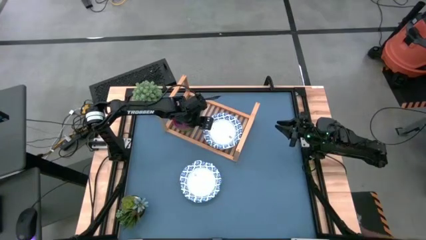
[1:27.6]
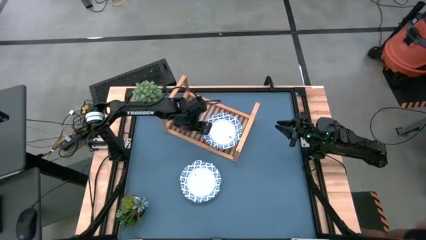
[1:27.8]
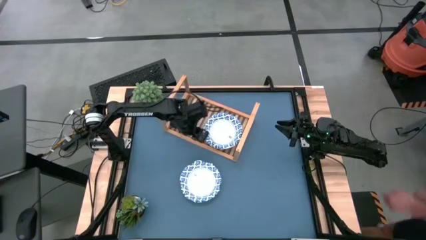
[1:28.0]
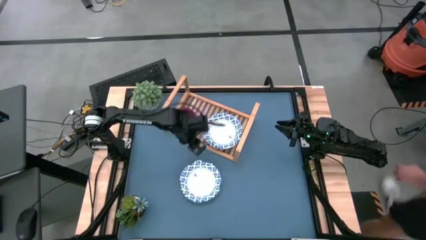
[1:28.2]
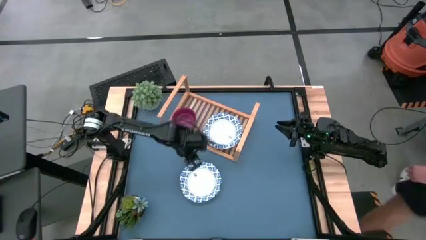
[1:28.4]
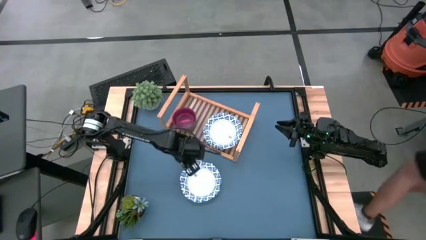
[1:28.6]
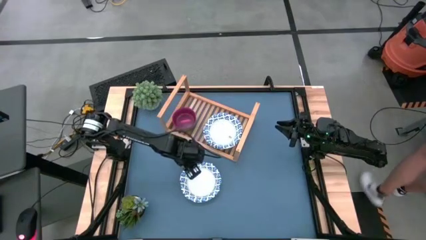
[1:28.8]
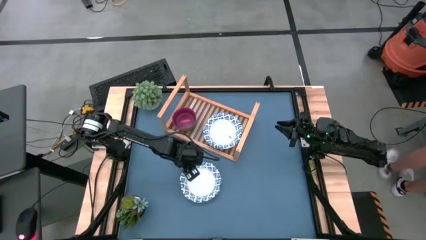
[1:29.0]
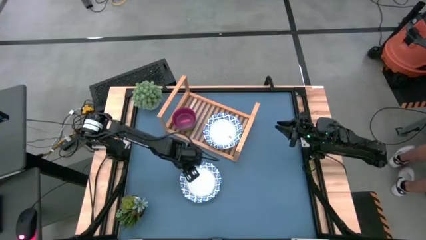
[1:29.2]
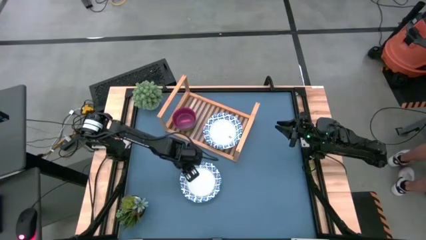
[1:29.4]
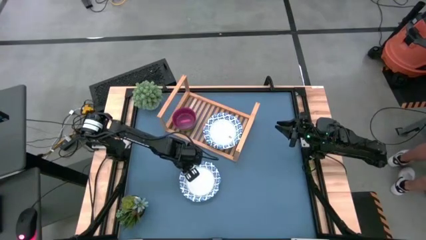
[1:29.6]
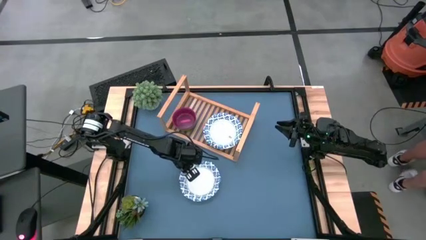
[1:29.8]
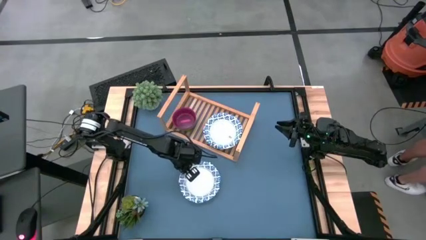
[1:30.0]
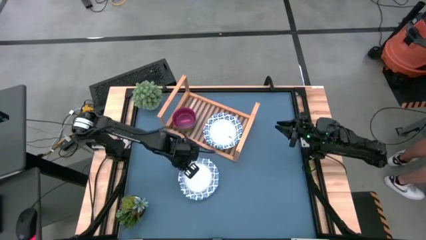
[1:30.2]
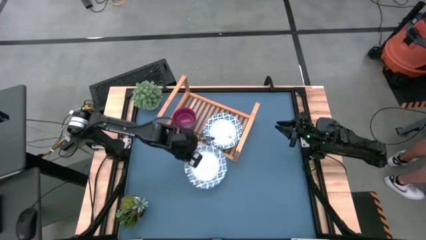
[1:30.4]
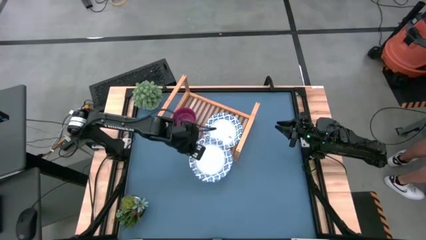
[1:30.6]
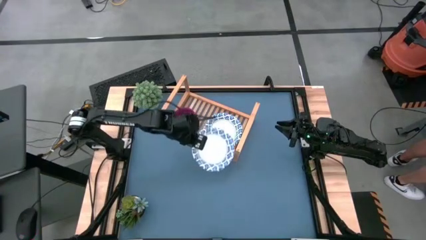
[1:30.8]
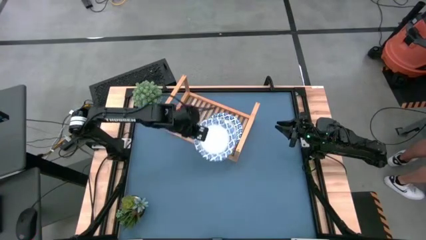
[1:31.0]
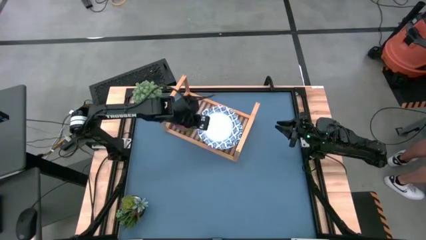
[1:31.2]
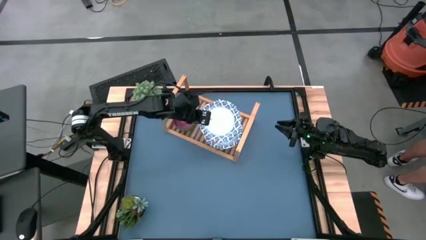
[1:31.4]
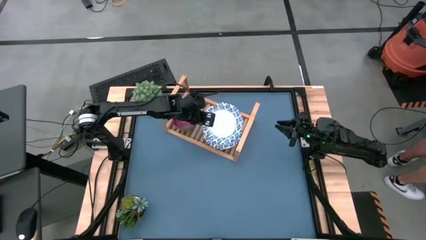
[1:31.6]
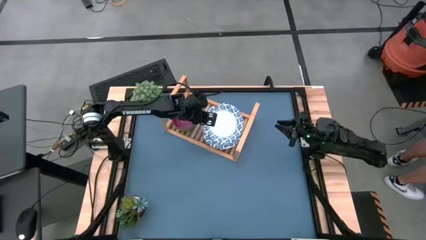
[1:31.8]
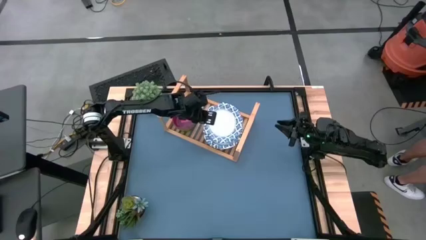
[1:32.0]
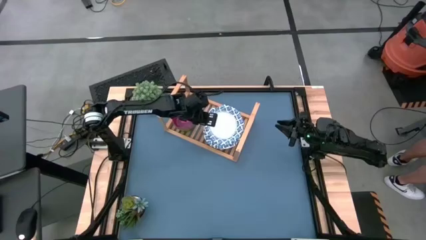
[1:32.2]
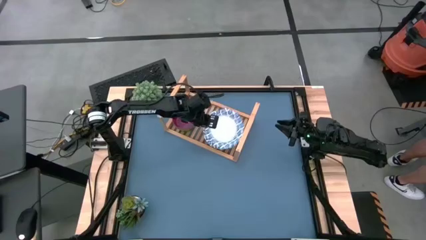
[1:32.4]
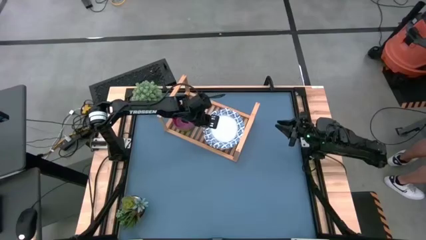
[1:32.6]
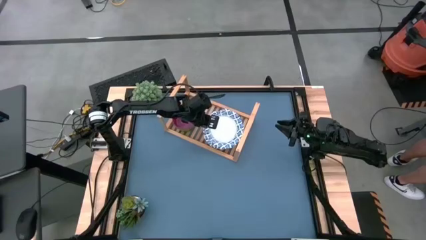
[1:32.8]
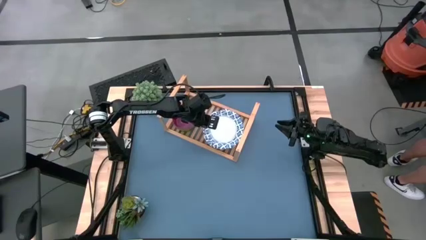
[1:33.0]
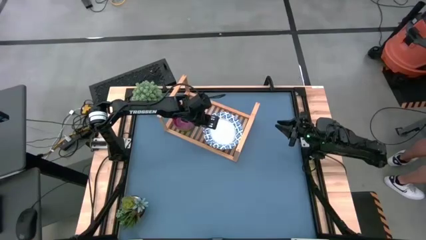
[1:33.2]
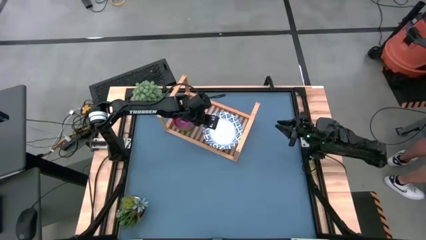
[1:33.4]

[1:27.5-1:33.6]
Task: Place and stack bowls onto a shelf
Stack the large white bowl on top of the large white bowl on the shelf

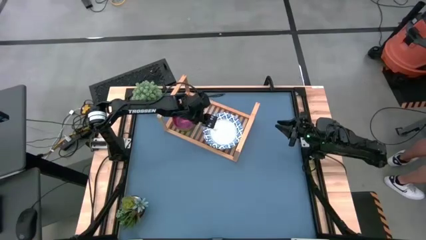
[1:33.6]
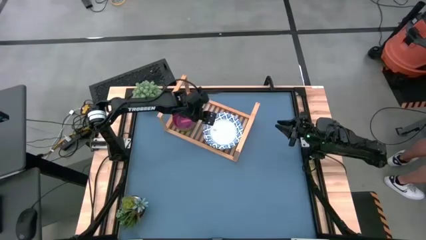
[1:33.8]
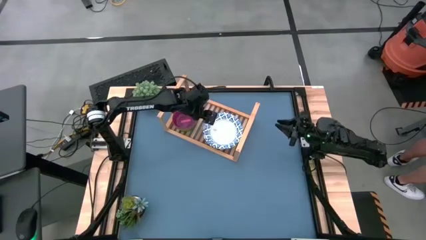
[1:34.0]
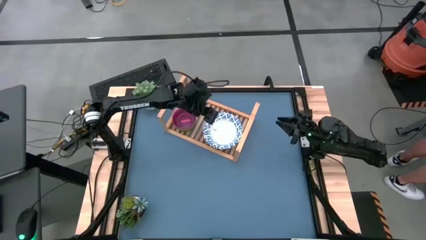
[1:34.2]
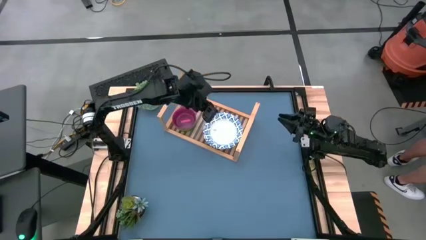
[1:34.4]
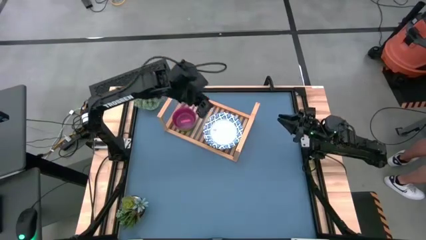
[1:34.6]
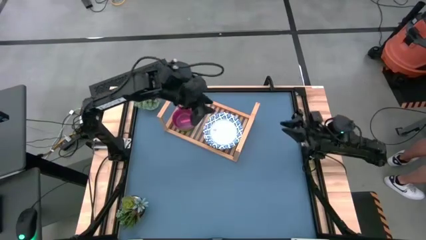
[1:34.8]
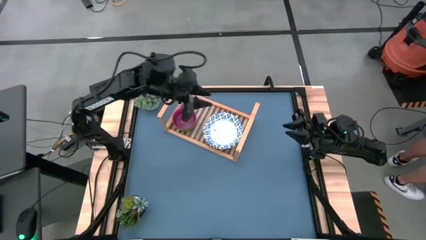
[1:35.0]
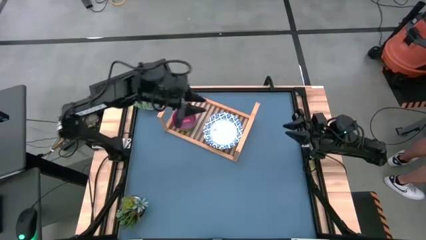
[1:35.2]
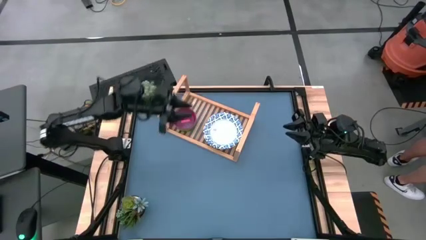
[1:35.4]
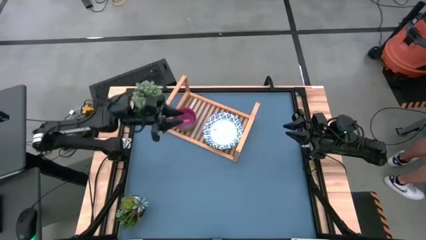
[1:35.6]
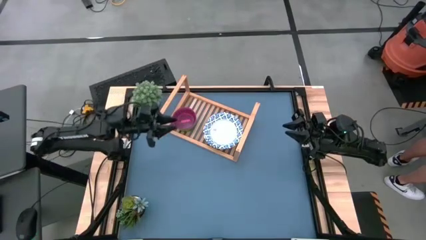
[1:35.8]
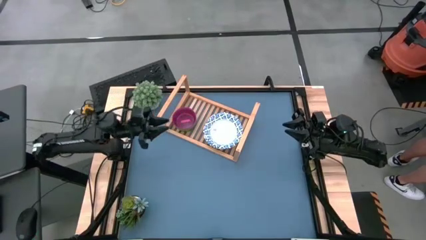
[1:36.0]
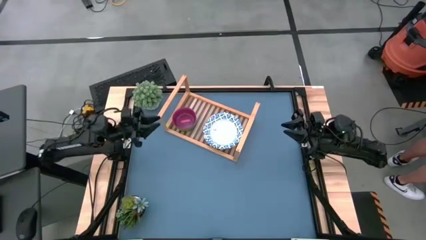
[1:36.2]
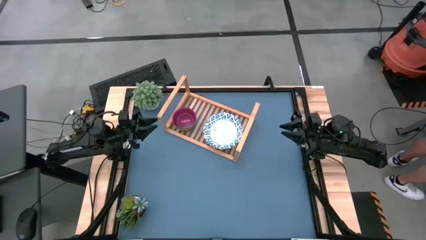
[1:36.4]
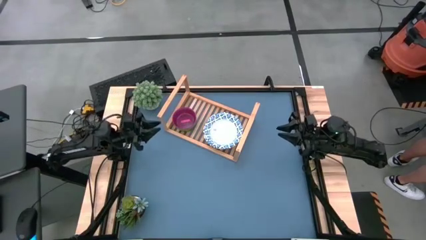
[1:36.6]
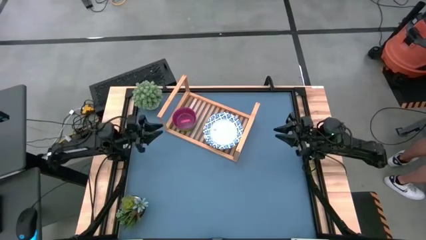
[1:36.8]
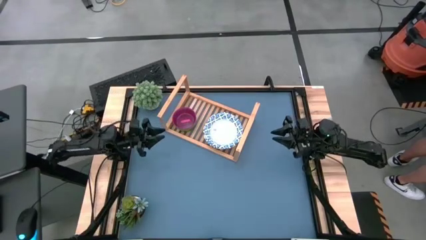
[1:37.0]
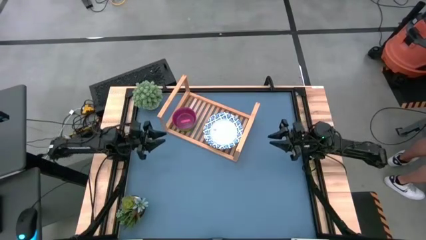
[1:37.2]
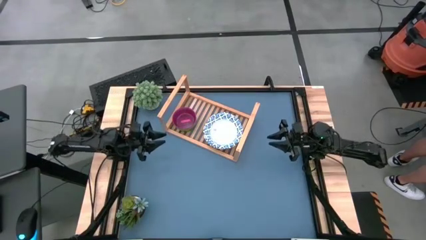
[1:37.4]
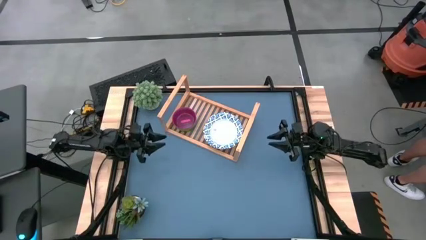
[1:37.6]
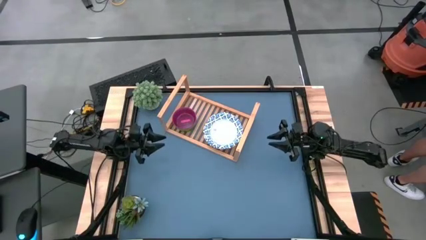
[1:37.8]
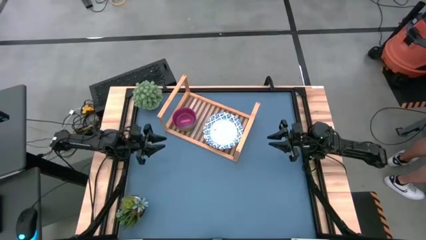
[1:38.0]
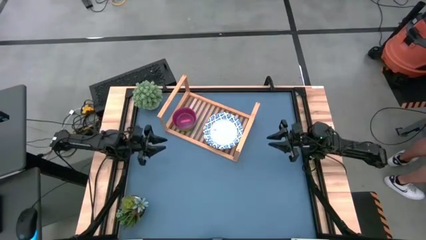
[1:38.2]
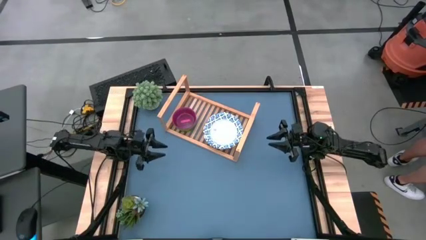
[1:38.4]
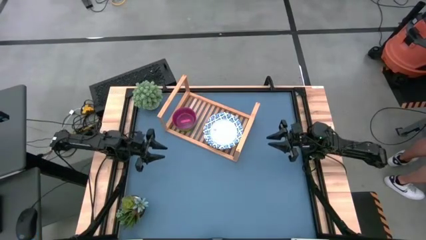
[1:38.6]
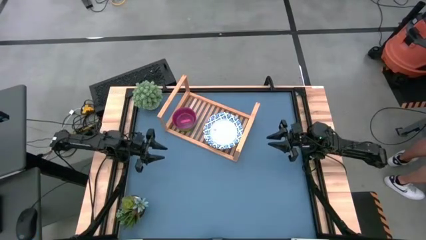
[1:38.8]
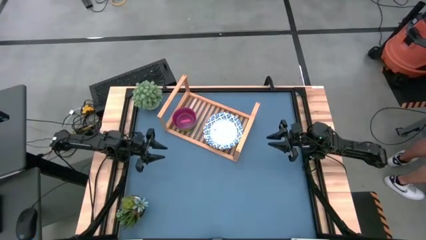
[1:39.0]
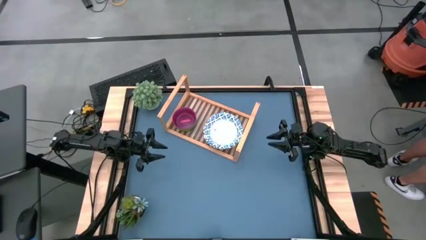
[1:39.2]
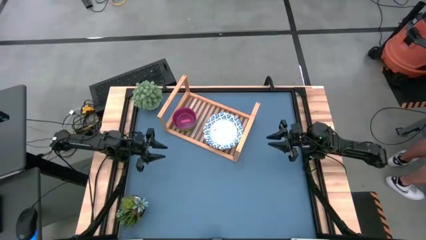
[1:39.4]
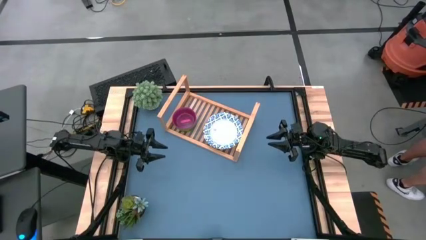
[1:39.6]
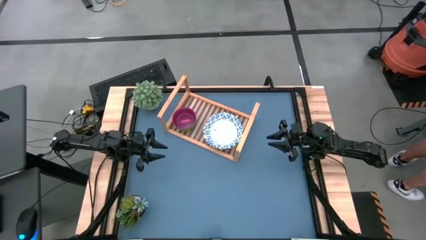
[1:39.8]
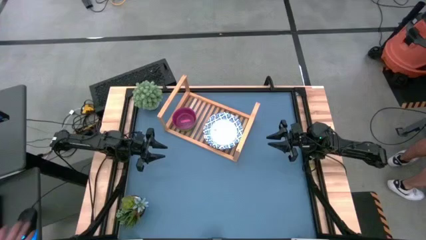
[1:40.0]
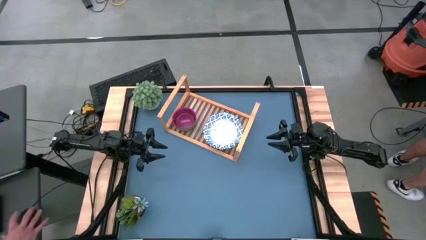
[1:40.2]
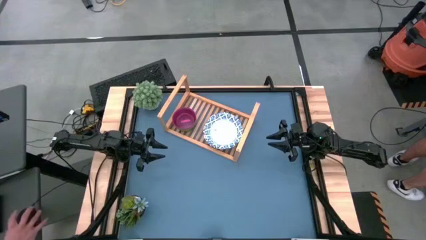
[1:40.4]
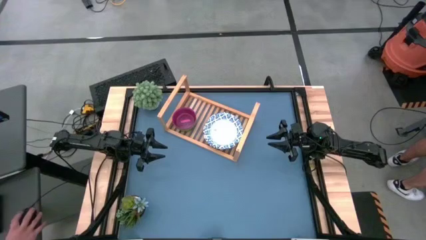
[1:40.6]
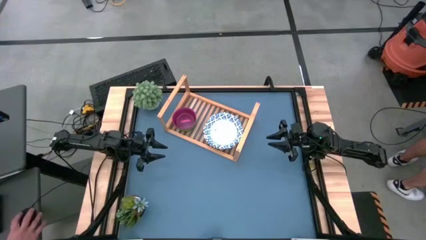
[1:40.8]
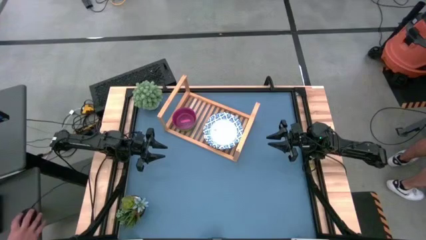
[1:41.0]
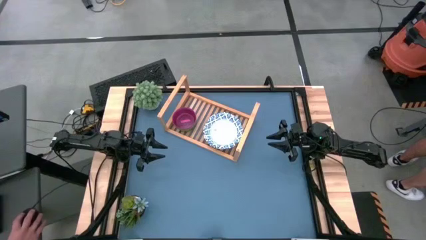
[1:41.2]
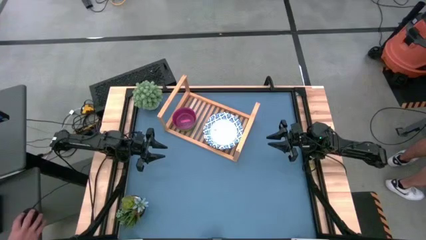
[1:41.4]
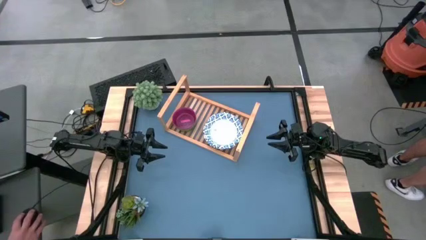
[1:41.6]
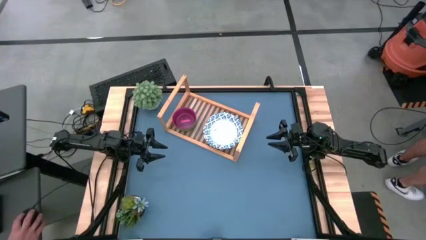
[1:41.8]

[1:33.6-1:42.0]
Return to Home Position
